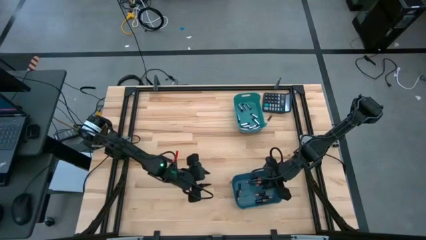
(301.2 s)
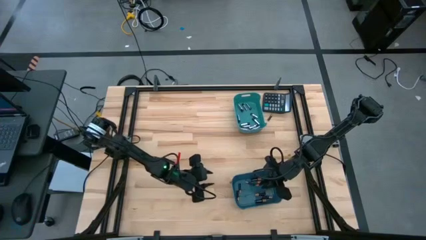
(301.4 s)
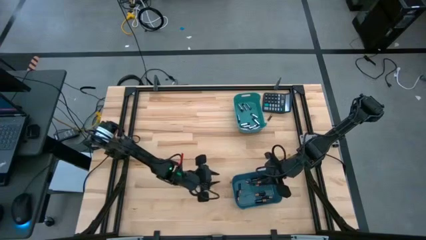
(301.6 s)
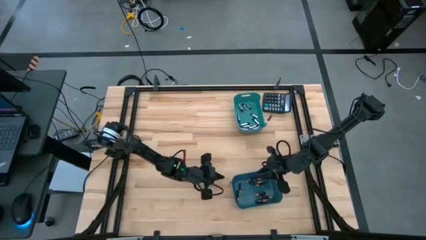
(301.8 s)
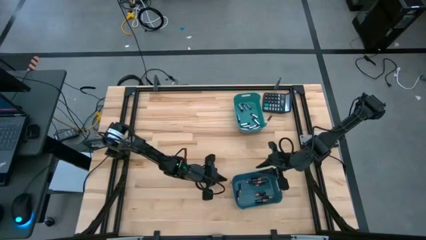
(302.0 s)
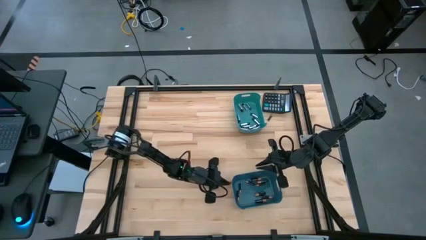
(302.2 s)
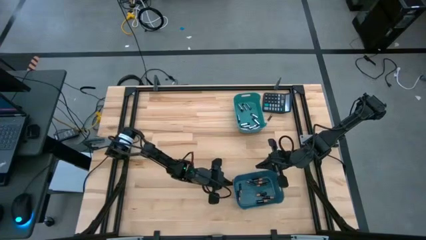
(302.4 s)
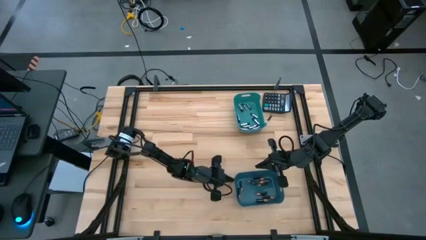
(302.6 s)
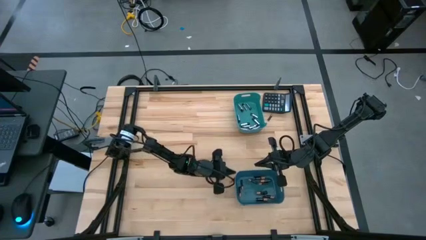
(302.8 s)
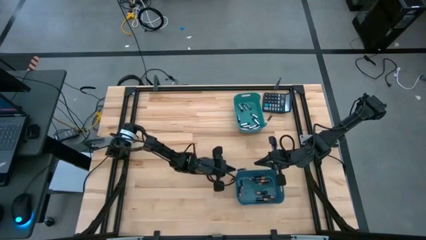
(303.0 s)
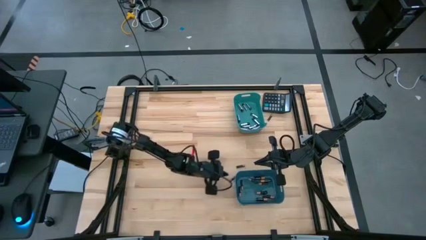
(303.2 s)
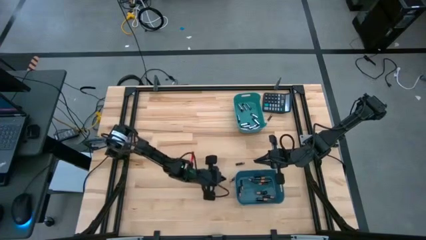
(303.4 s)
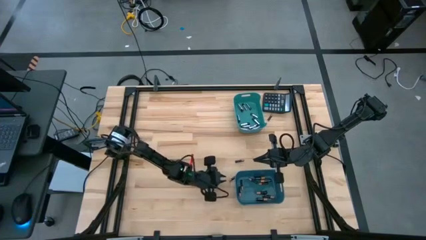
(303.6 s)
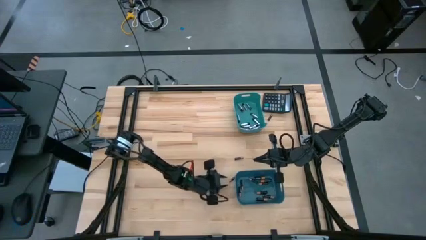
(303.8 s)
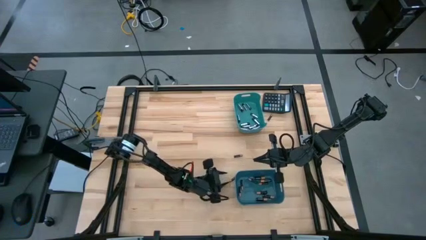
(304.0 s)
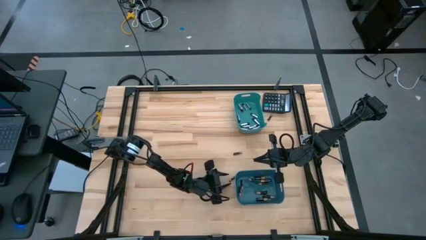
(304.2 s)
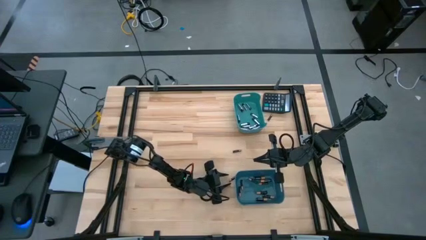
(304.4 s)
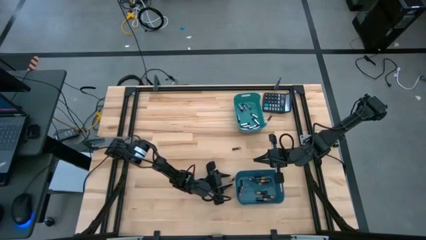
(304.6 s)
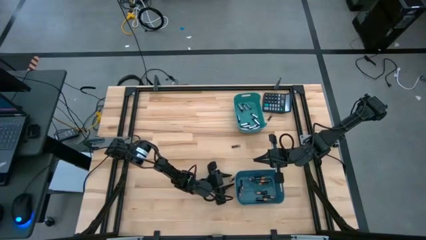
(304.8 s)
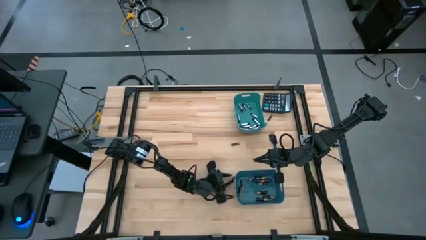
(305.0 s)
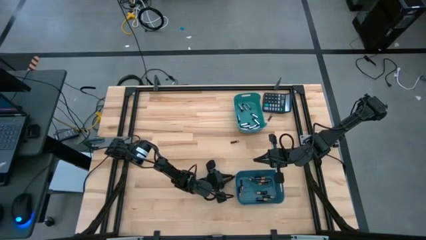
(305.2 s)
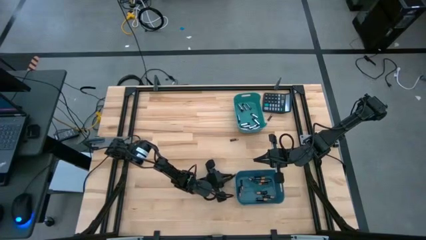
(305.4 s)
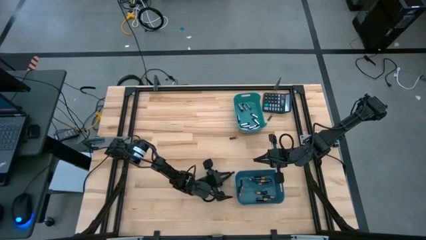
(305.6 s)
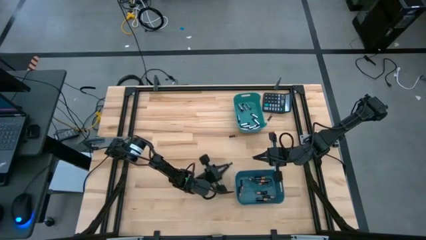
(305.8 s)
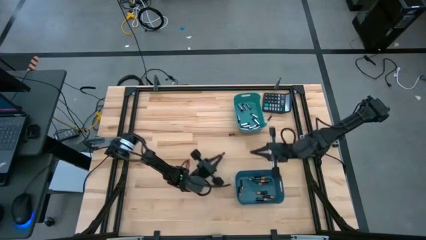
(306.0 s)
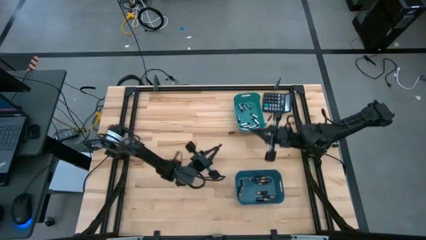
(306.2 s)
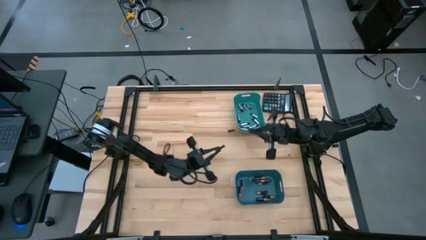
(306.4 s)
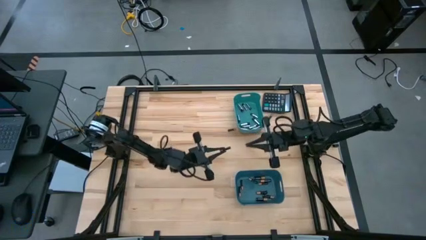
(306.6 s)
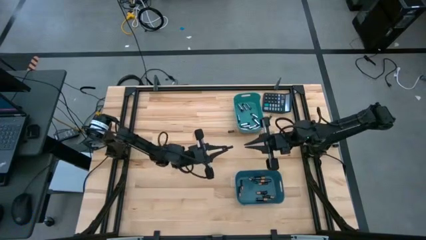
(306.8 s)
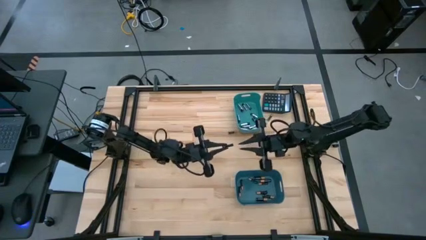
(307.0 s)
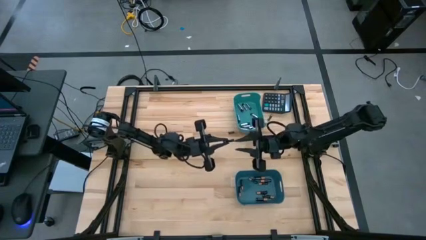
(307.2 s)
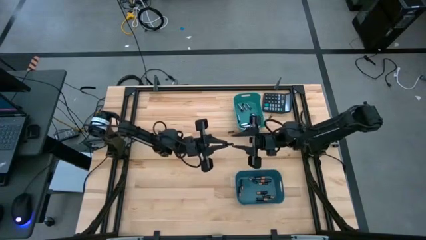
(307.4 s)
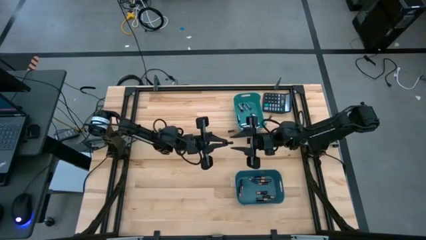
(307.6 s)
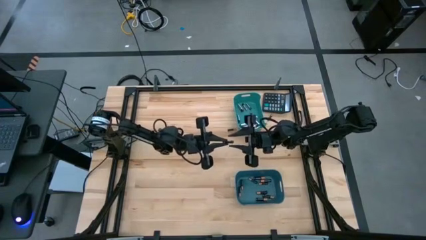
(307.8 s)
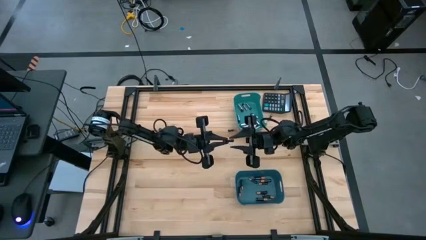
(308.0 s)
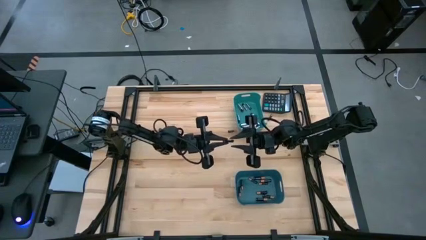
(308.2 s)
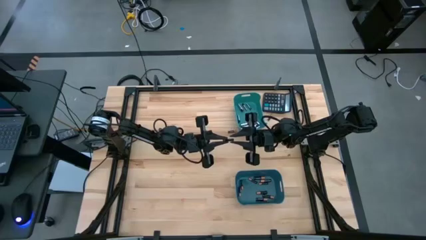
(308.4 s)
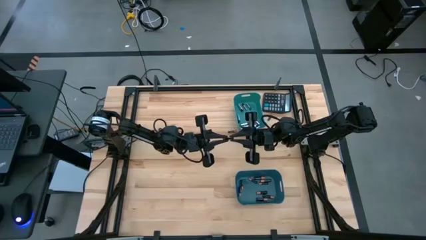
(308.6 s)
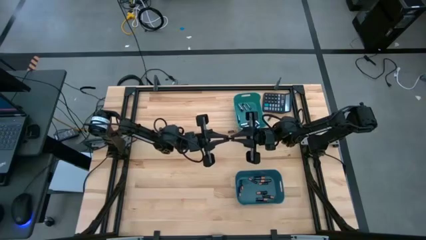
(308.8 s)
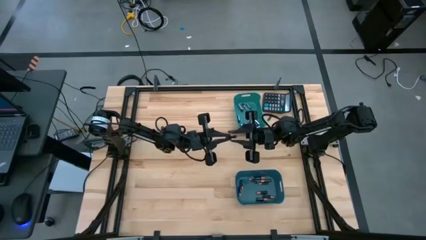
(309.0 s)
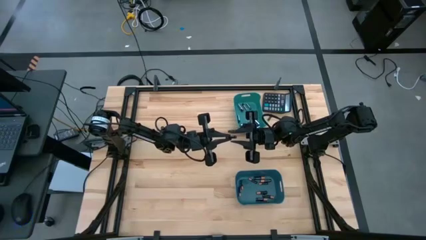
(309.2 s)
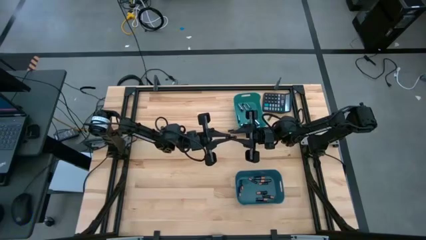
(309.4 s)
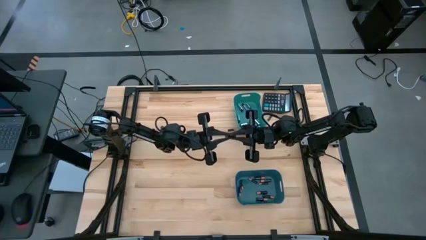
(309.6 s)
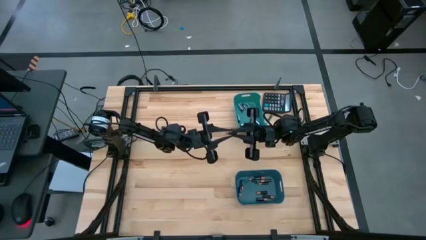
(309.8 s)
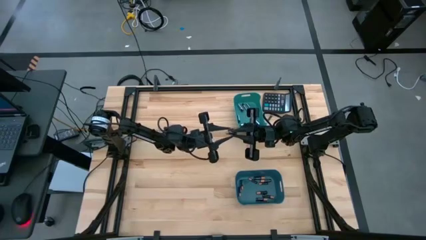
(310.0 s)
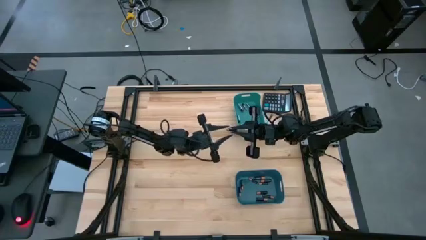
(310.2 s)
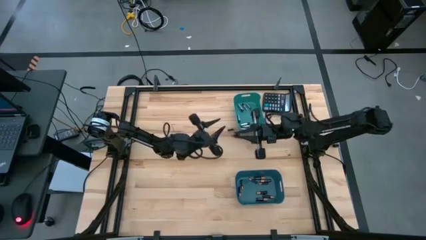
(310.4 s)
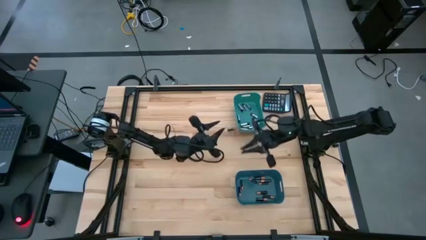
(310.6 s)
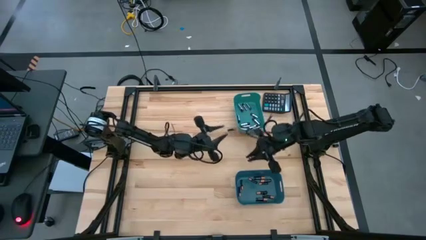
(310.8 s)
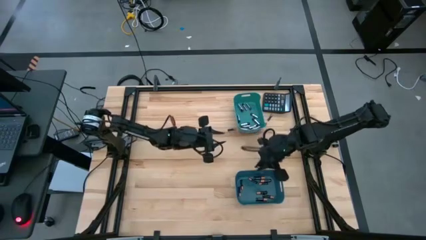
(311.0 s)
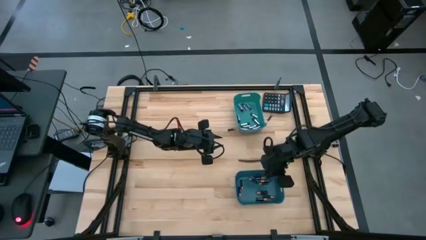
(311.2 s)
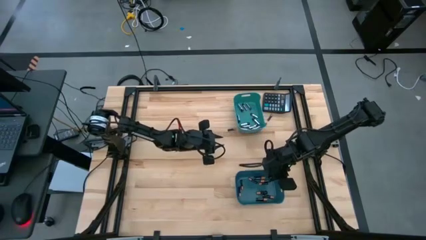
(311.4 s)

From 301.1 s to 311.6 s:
Task: Sort batteries
Put the black battery into the blue bin

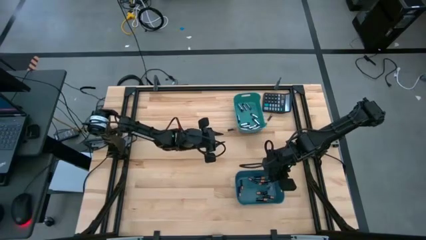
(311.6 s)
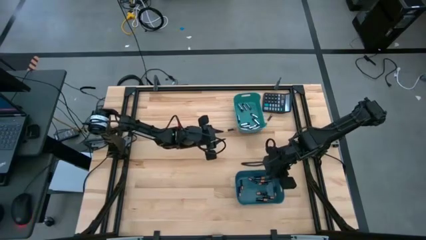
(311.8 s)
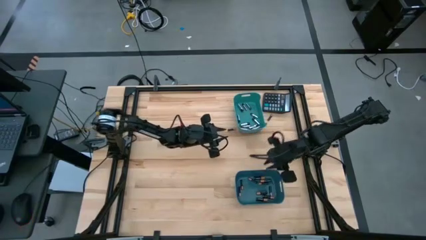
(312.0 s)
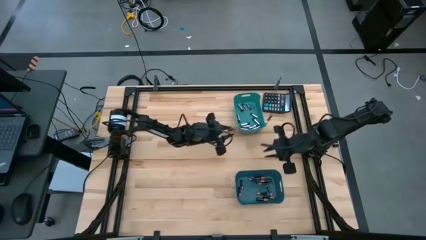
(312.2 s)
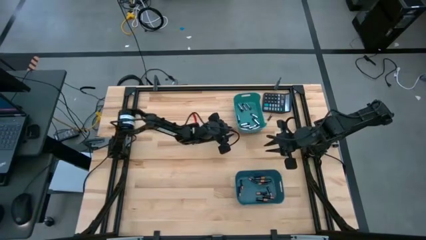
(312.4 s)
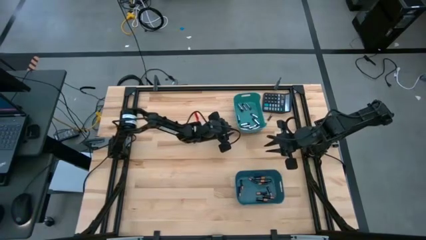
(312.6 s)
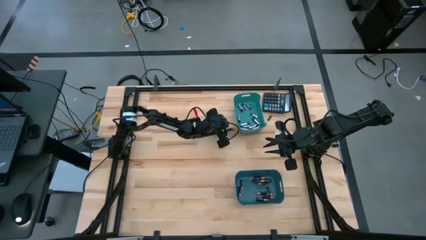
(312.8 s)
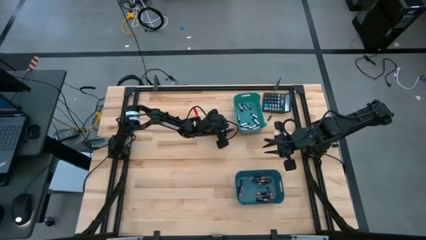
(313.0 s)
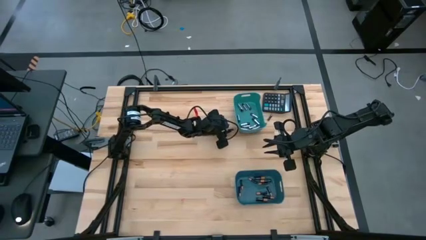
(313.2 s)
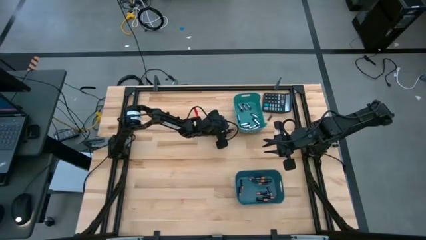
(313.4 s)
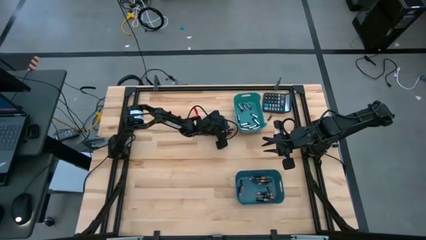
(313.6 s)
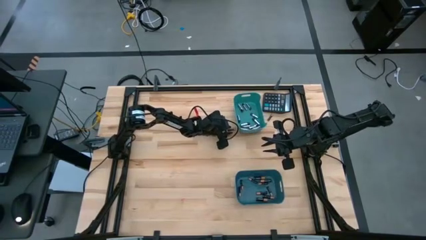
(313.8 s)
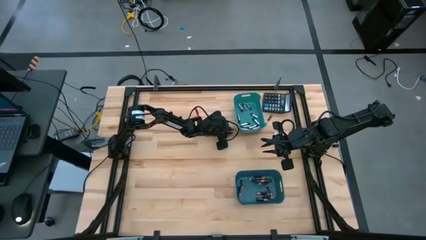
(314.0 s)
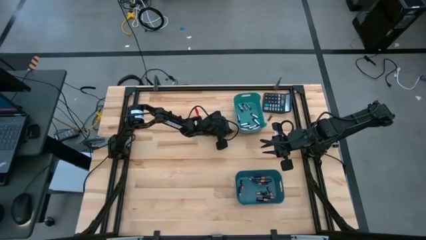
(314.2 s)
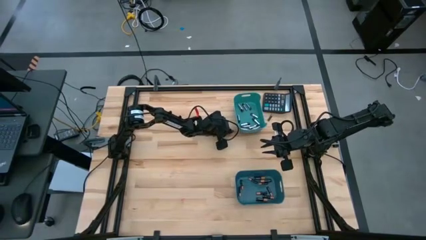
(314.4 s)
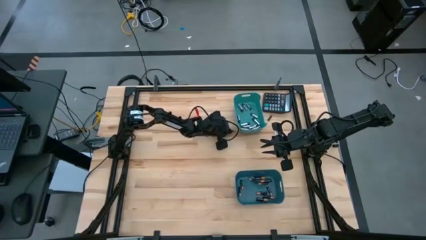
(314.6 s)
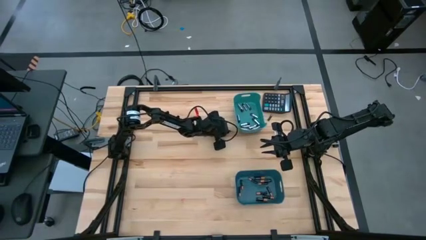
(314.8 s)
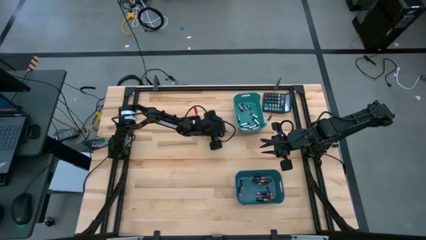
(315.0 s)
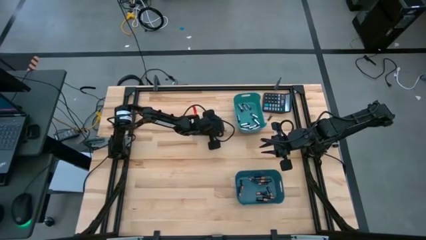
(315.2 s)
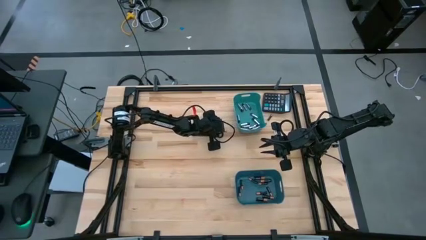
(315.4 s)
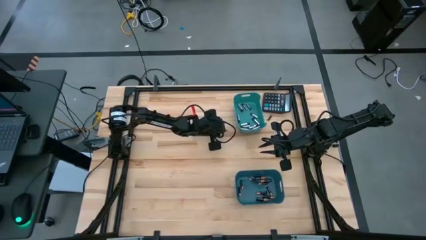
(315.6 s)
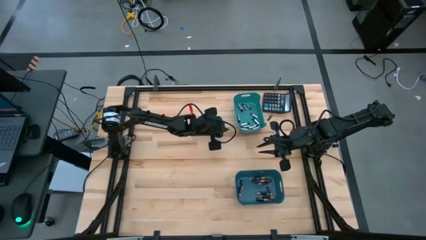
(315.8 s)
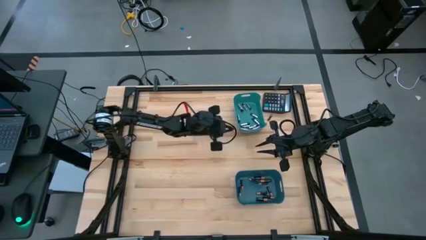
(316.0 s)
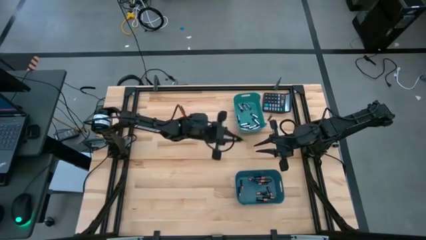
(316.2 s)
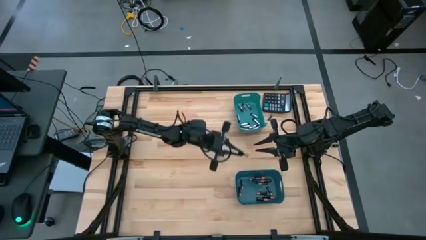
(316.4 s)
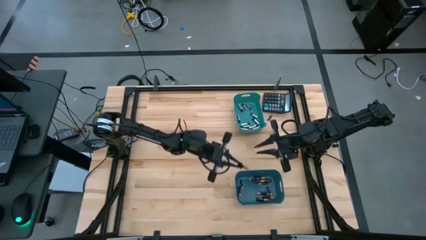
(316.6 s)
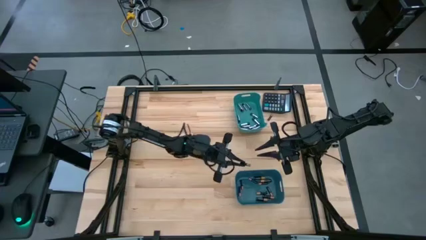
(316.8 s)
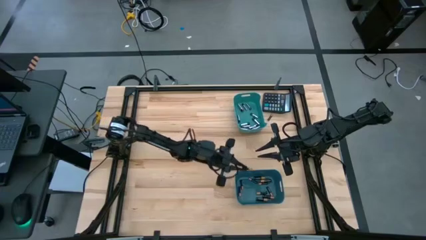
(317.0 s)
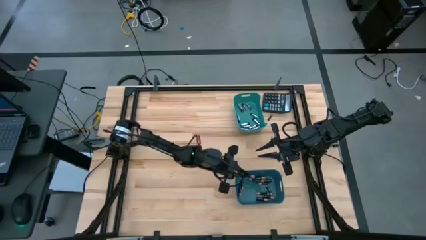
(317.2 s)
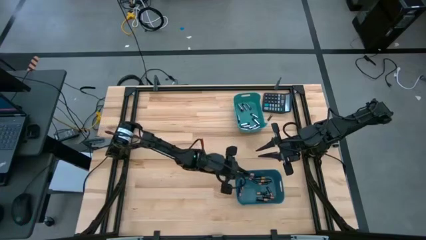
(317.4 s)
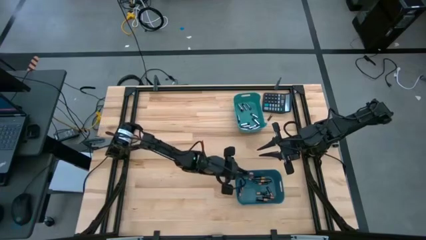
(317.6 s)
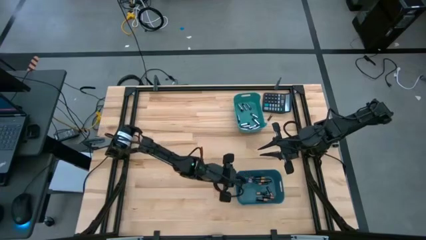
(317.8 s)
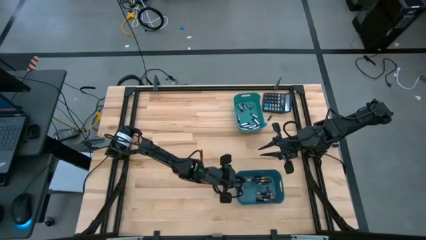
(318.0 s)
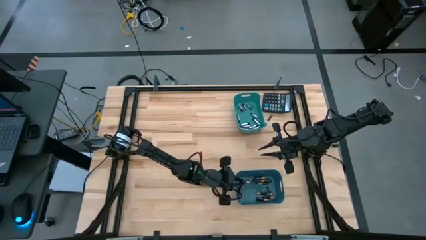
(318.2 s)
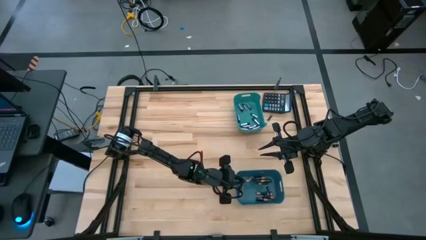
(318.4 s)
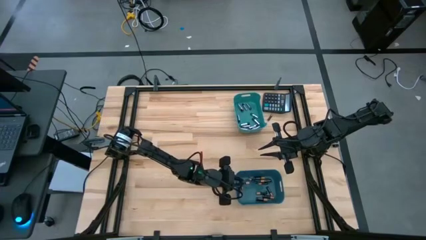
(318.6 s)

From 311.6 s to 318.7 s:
Put the black battery into the blue bin
